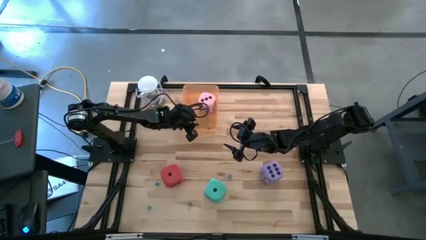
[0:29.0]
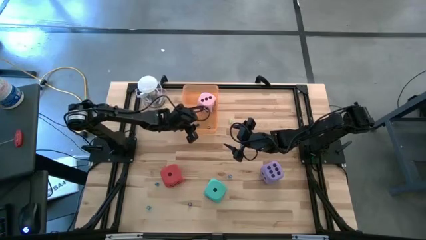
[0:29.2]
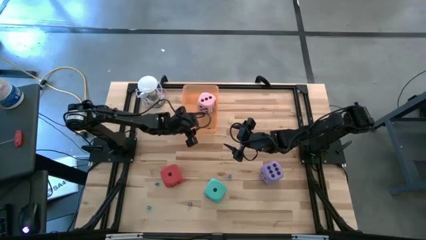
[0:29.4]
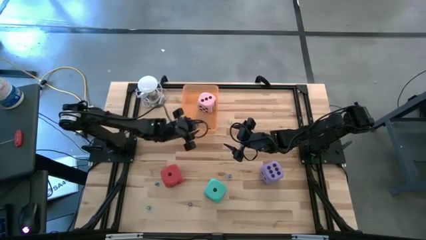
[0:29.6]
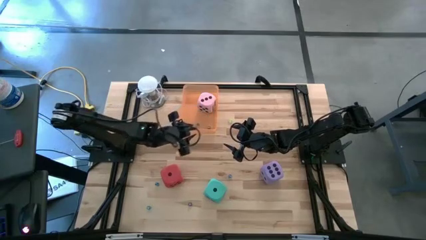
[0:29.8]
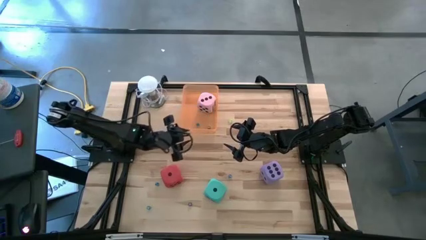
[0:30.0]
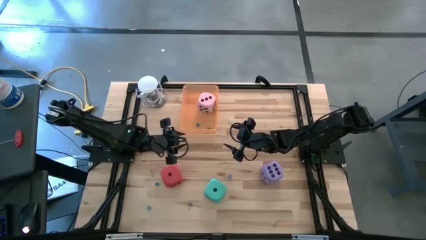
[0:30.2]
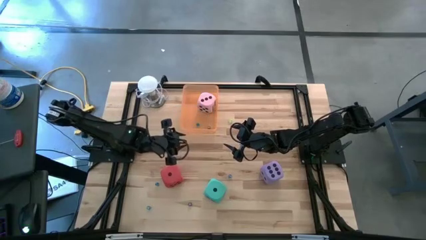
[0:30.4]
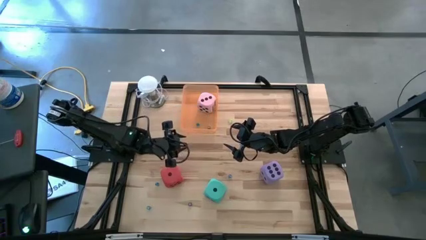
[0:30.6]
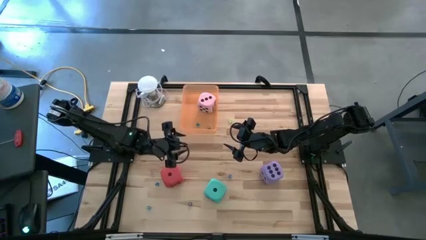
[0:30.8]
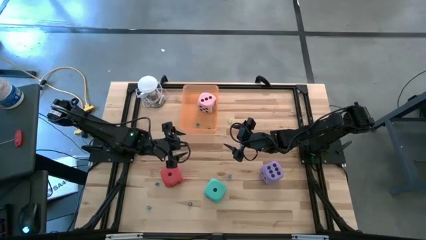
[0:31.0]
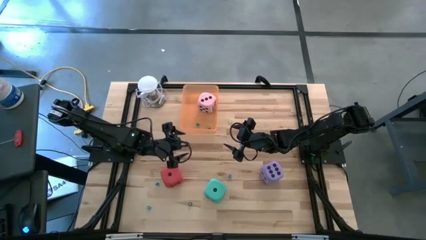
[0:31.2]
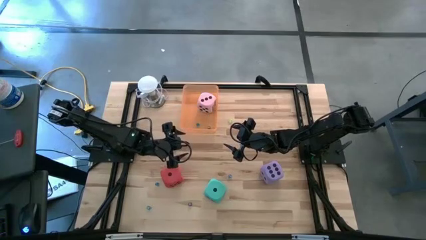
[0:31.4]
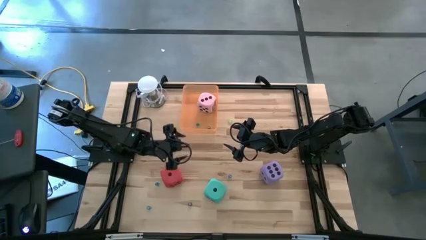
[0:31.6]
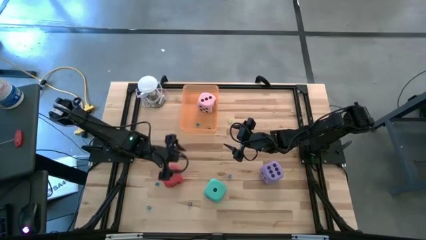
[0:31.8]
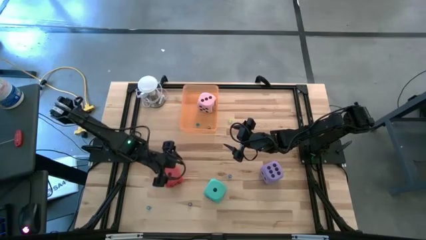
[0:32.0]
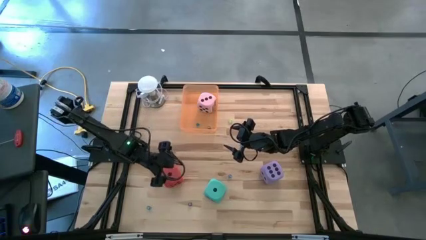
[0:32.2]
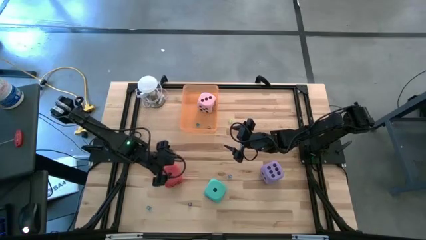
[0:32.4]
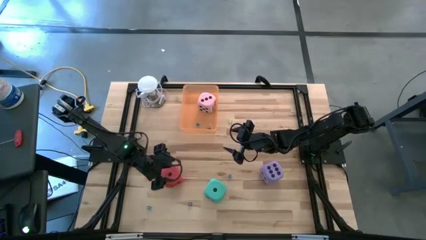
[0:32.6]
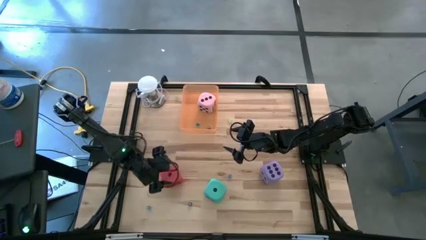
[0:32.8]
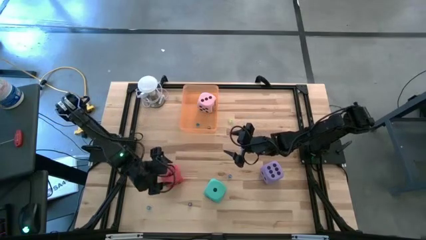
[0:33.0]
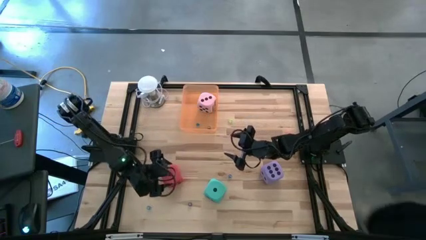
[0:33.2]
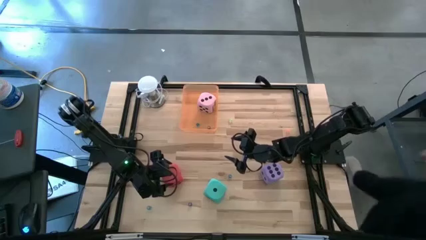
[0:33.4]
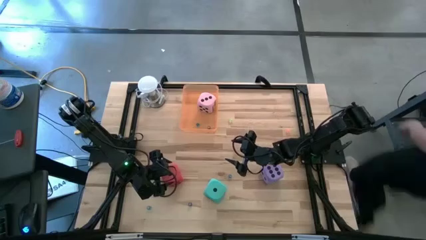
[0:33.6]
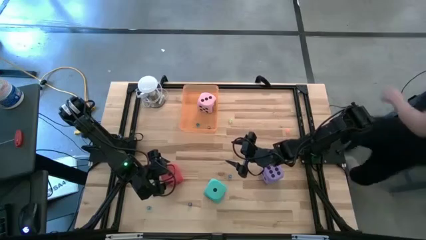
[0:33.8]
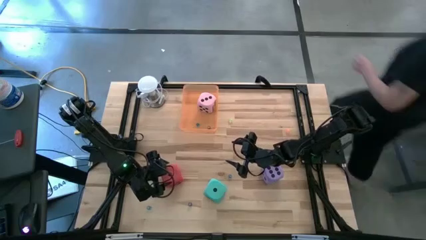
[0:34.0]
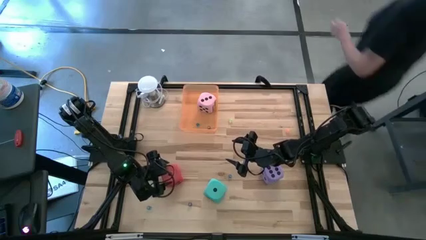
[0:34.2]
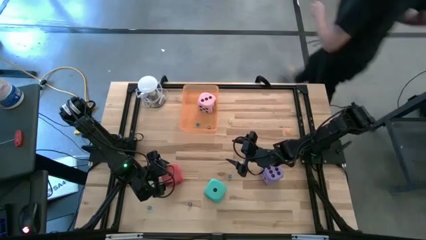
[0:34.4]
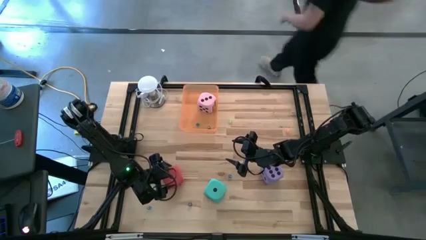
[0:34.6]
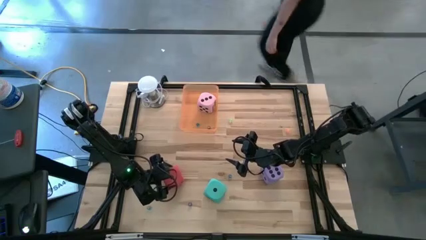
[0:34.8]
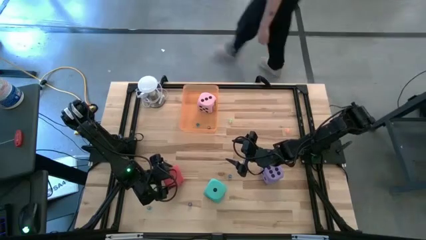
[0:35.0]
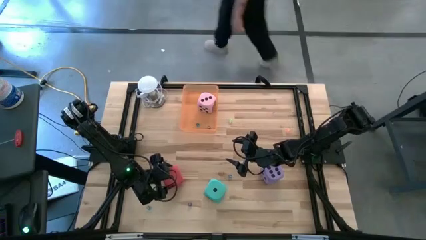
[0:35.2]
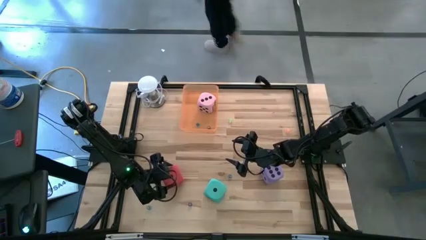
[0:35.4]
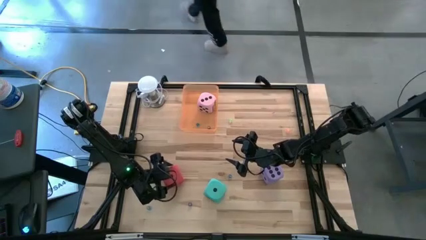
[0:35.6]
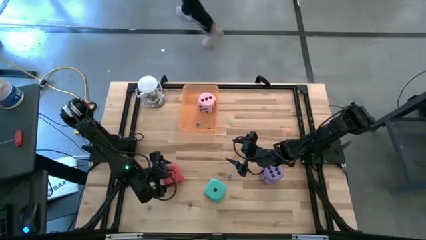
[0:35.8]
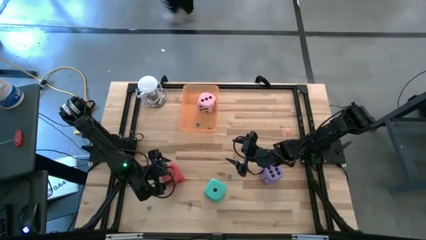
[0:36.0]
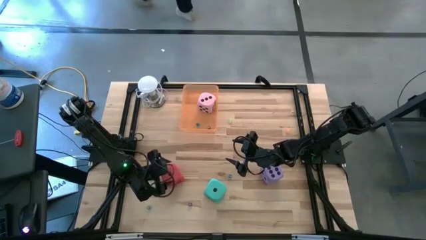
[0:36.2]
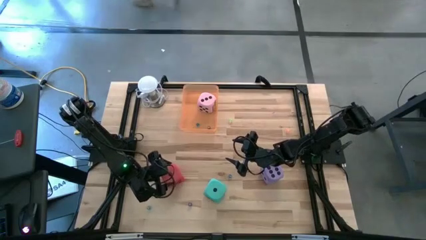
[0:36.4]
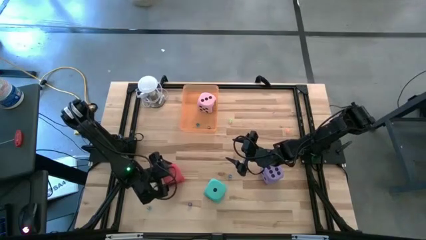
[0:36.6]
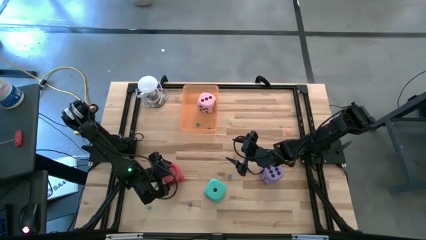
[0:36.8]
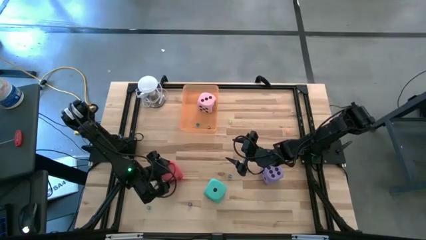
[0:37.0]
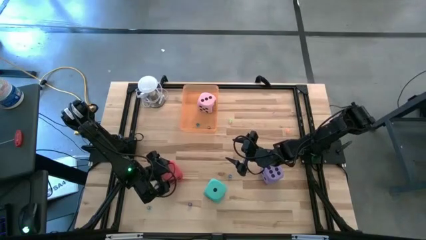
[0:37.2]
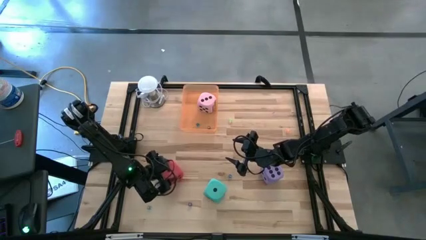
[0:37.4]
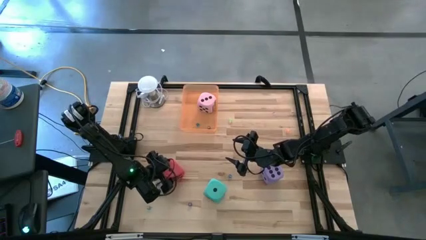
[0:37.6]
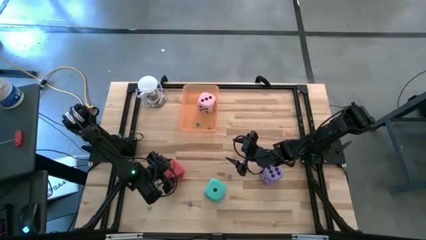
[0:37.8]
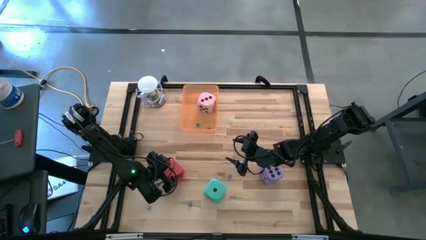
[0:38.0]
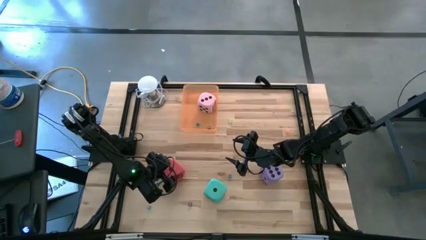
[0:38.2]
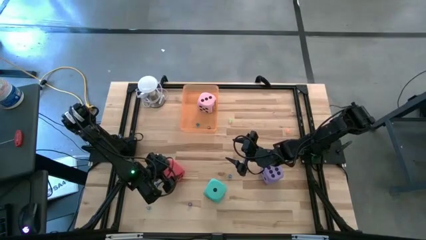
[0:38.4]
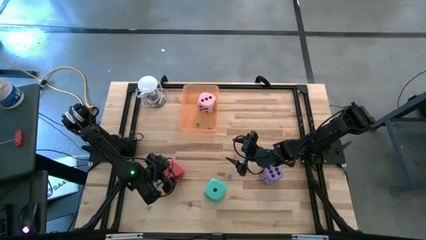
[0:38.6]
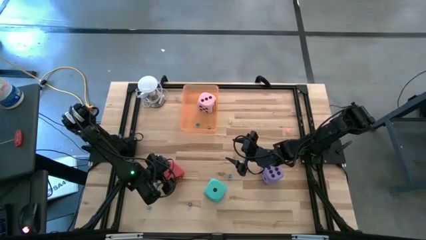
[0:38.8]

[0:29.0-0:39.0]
Task: Pick & Place Dice
Put the big red die into the orange bin

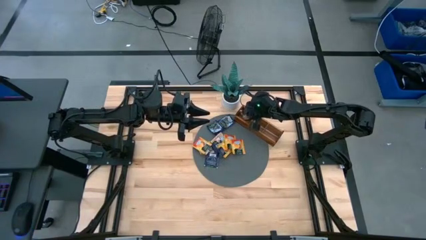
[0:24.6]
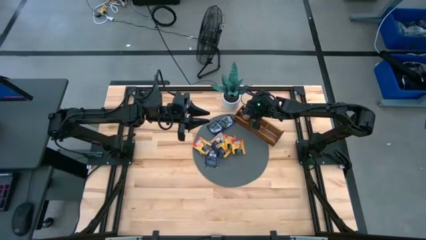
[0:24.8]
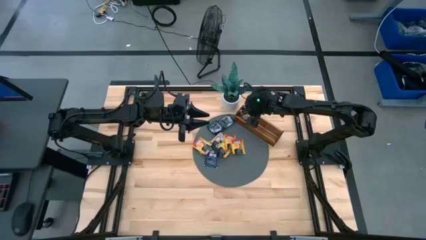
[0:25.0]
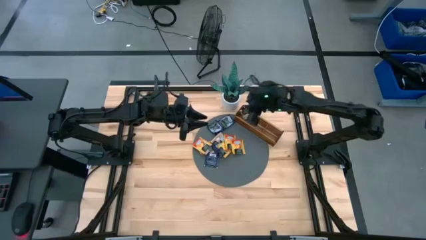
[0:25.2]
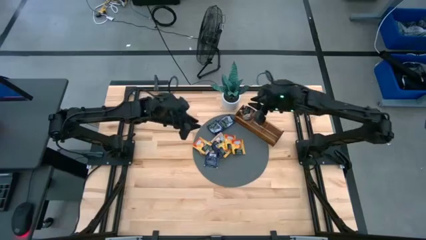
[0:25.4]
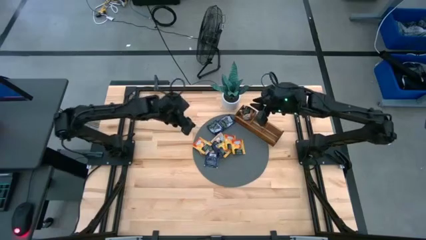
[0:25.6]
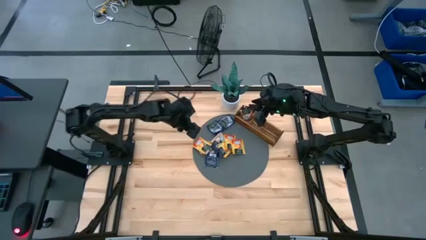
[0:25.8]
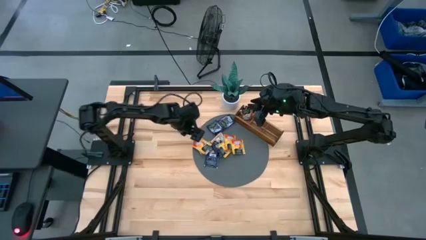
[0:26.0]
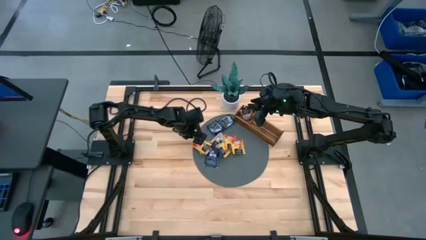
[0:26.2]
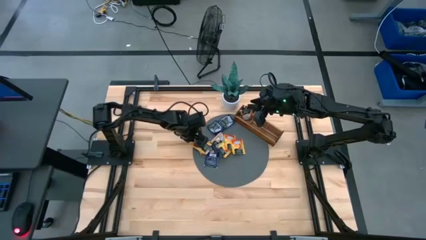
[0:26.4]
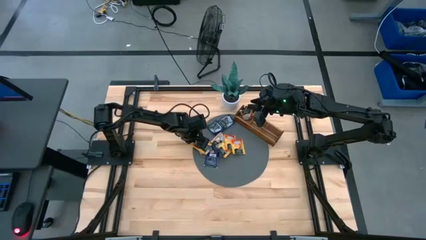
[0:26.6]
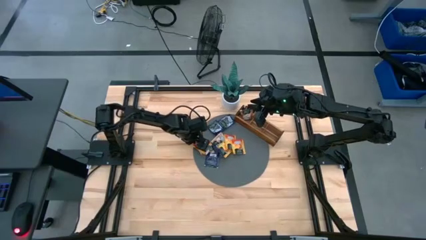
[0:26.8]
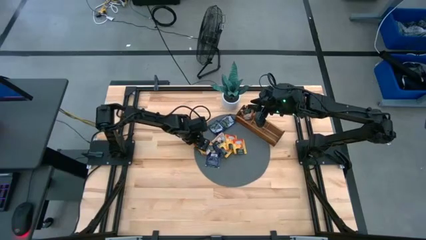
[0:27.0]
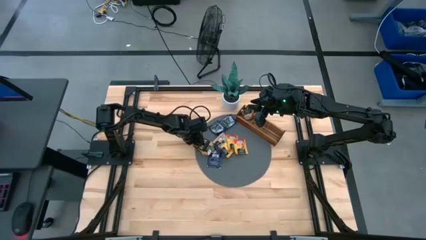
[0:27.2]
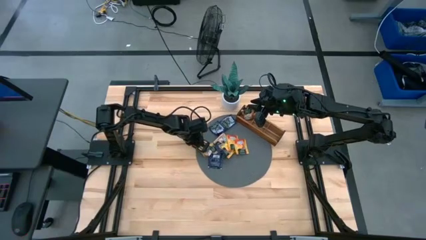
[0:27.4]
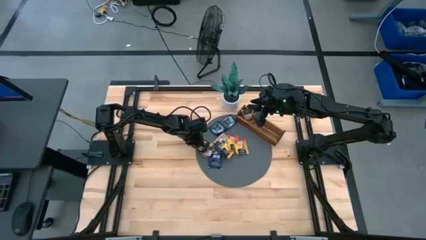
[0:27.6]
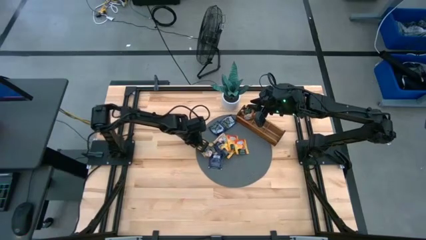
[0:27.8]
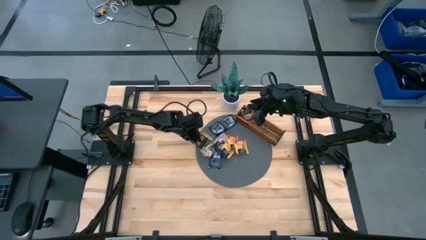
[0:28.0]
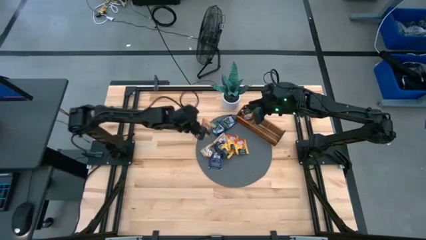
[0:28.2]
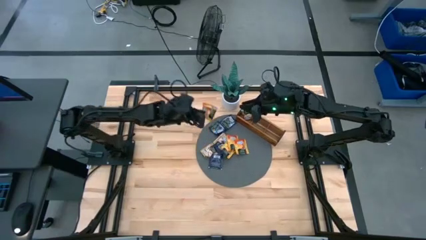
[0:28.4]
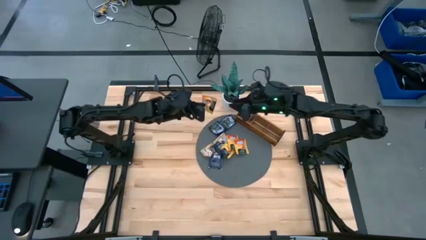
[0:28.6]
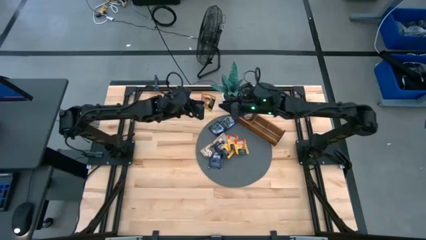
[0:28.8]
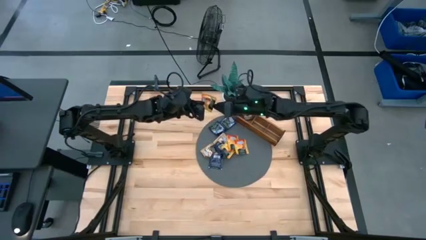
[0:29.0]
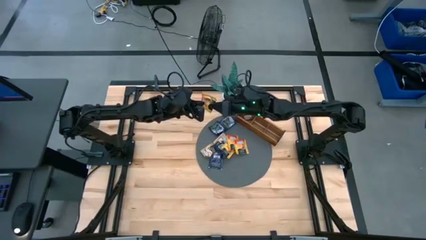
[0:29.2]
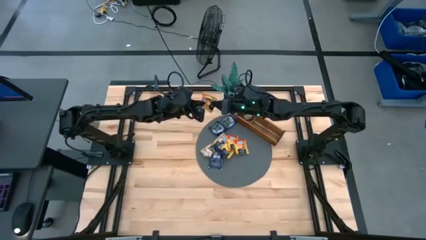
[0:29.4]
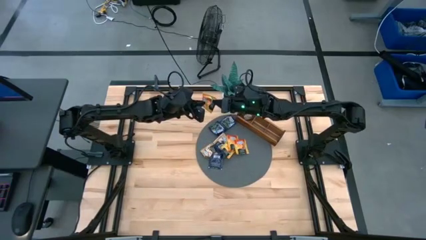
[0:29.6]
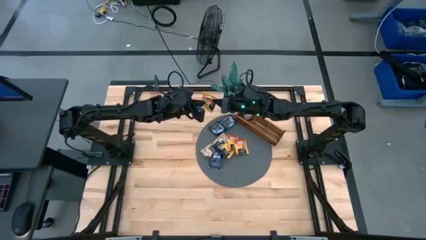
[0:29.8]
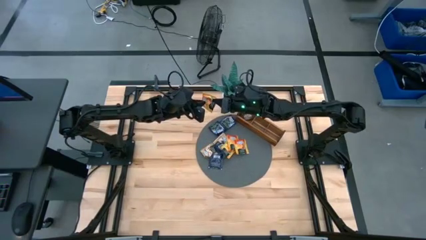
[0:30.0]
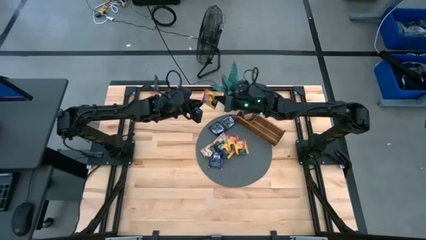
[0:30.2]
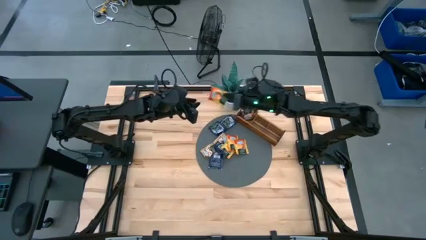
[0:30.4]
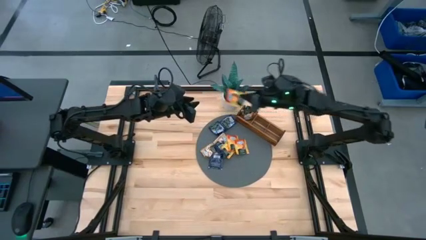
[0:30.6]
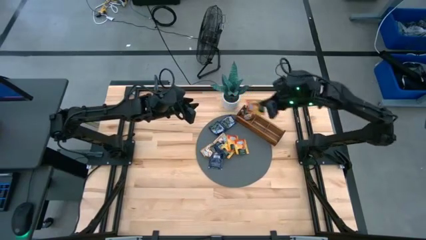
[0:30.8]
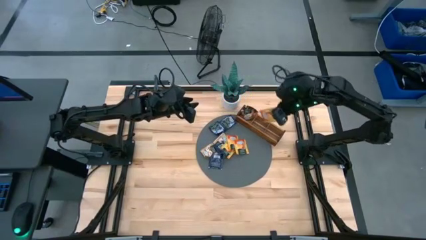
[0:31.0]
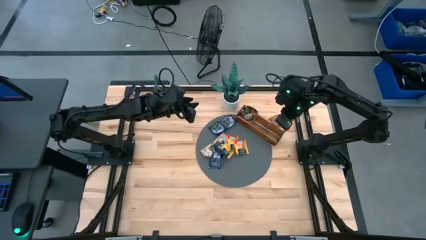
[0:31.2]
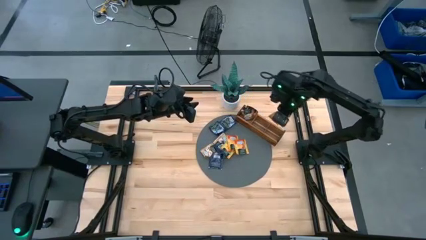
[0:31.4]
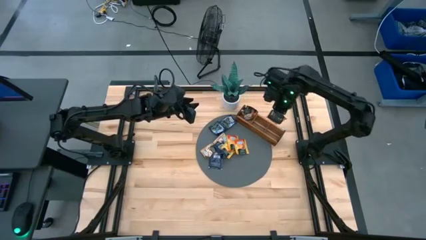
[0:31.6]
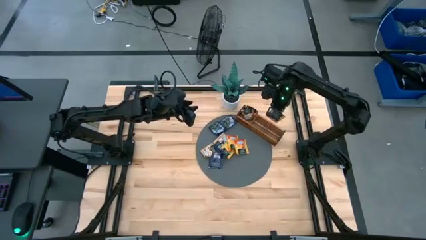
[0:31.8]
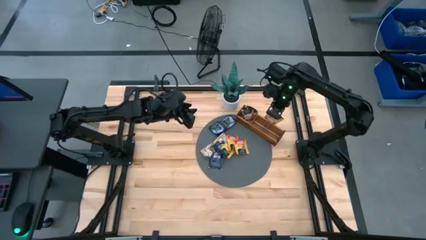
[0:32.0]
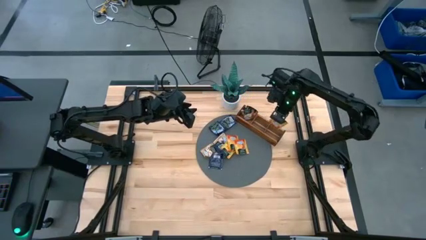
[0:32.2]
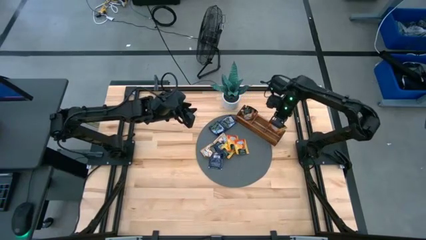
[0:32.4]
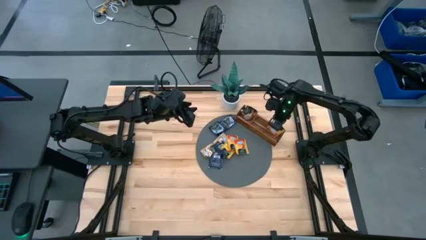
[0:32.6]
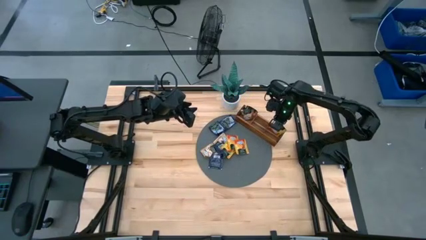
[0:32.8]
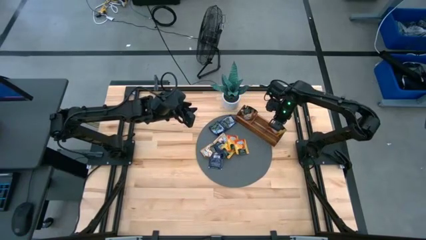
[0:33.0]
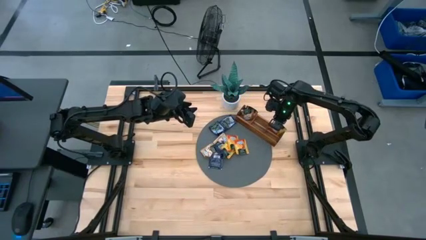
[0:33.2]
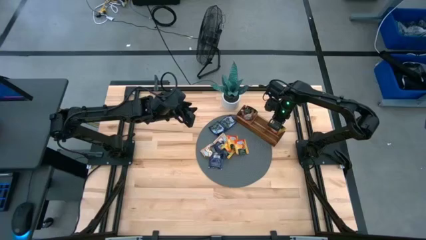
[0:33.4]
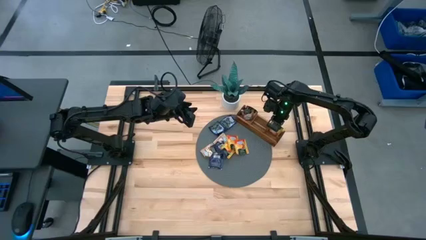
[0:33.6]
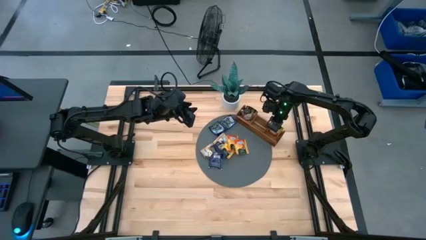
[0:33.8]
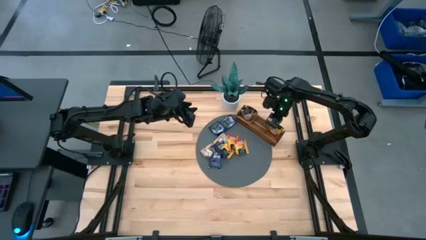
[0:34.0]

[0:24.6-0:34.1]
Task: Pick & Place Tea
Put the yellow tea bag into the wooden organizer
